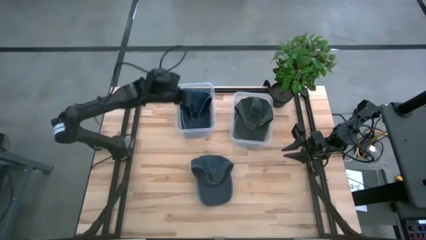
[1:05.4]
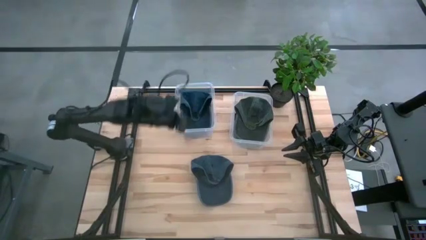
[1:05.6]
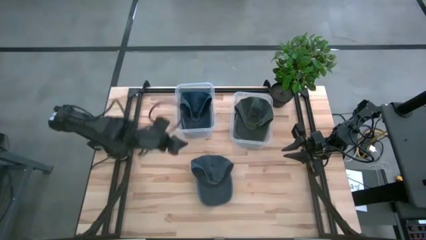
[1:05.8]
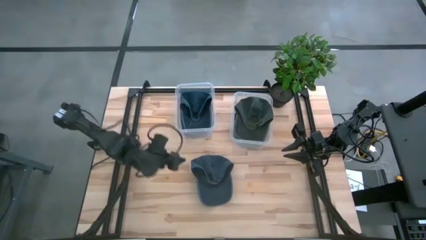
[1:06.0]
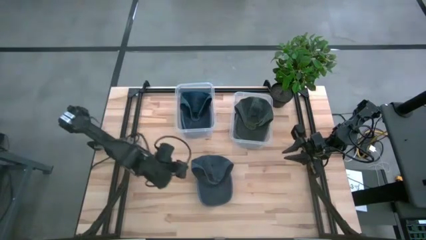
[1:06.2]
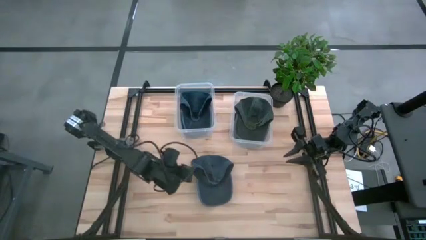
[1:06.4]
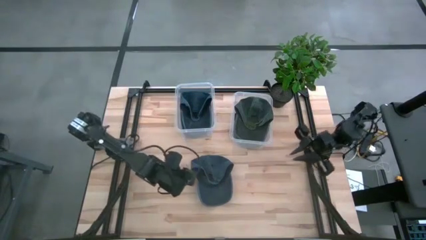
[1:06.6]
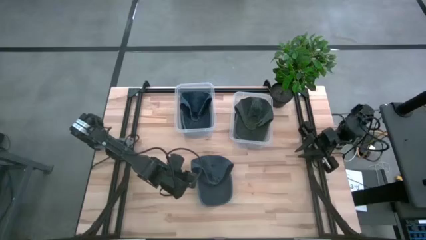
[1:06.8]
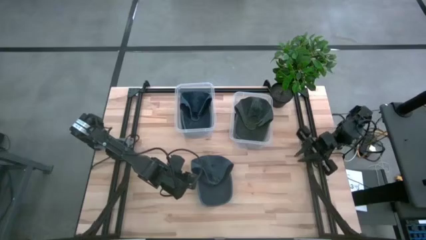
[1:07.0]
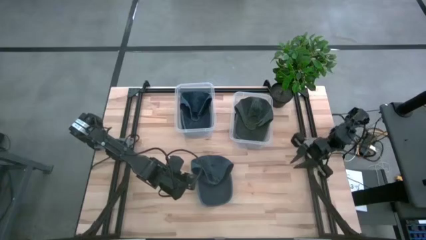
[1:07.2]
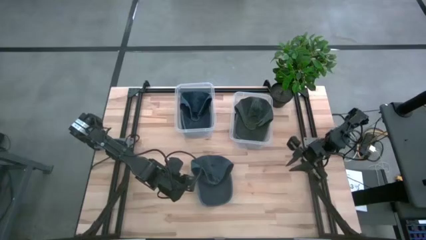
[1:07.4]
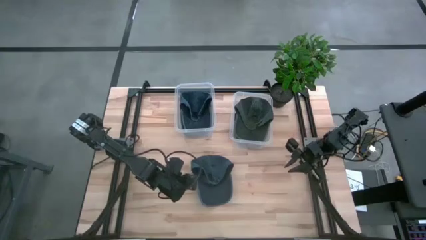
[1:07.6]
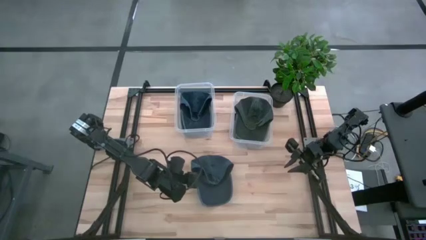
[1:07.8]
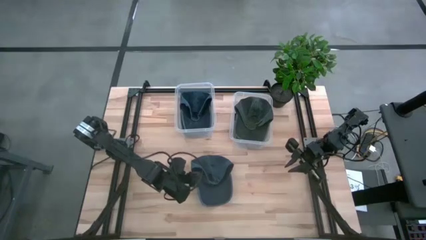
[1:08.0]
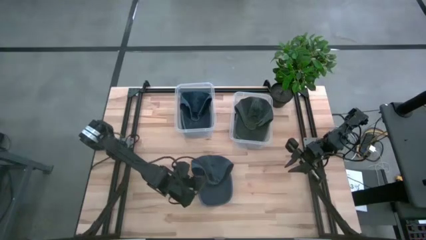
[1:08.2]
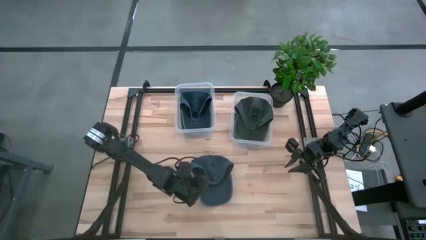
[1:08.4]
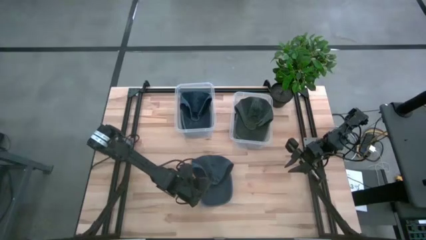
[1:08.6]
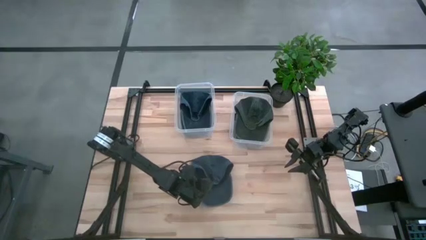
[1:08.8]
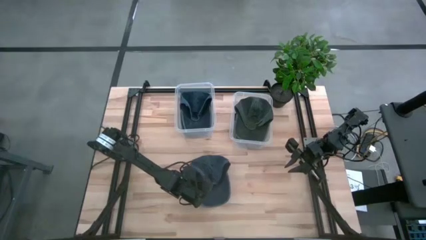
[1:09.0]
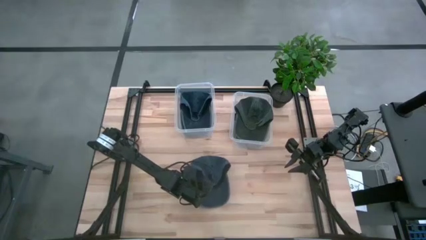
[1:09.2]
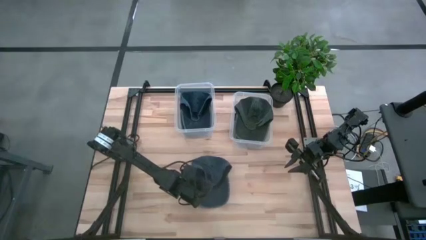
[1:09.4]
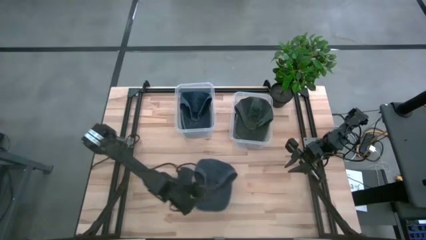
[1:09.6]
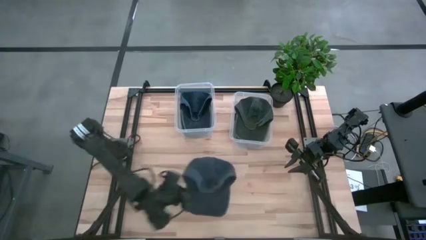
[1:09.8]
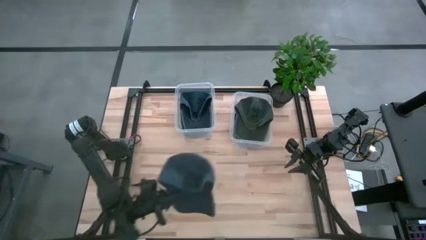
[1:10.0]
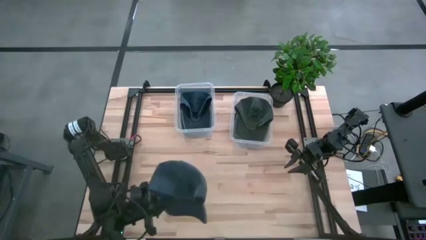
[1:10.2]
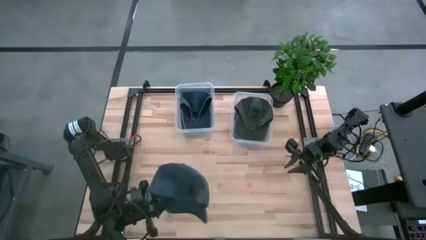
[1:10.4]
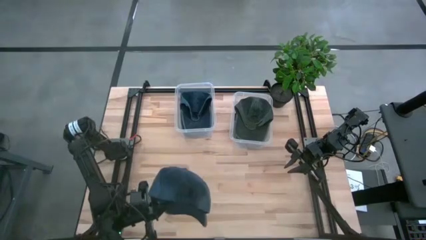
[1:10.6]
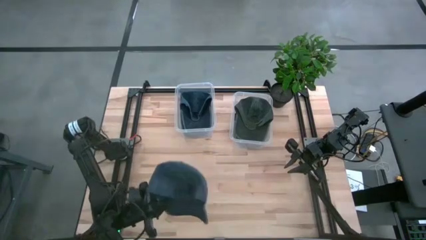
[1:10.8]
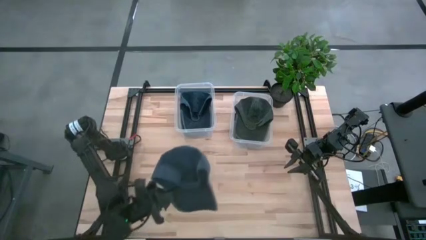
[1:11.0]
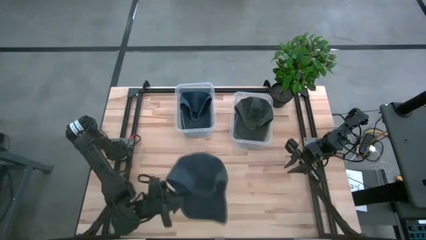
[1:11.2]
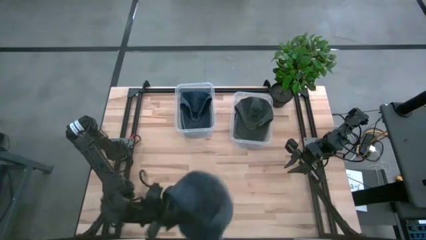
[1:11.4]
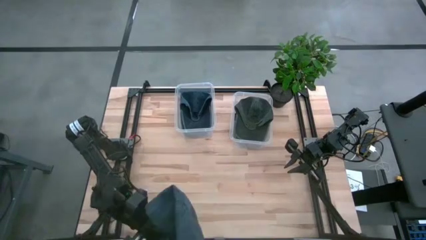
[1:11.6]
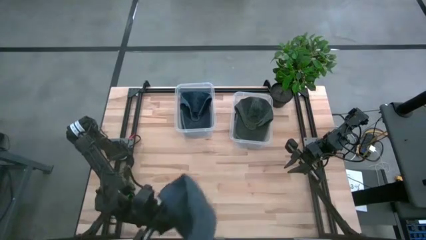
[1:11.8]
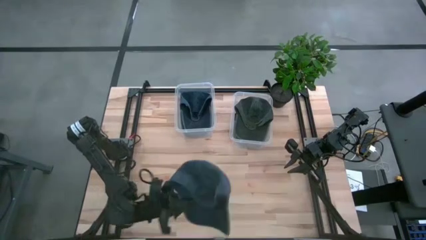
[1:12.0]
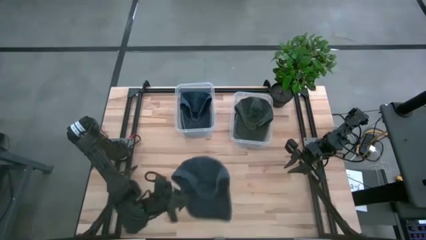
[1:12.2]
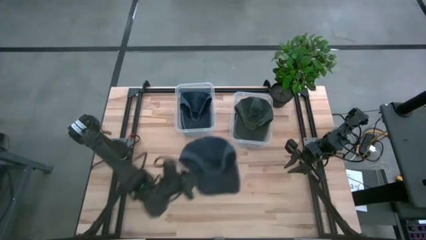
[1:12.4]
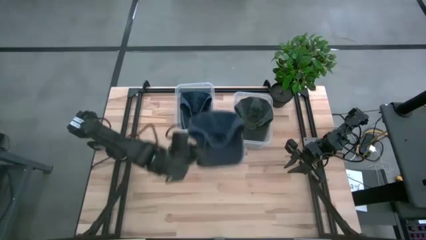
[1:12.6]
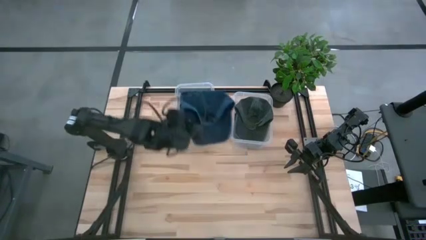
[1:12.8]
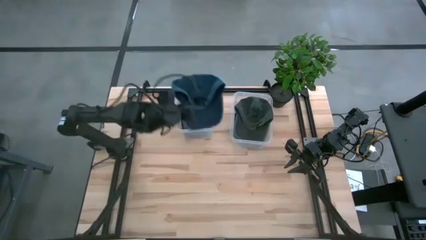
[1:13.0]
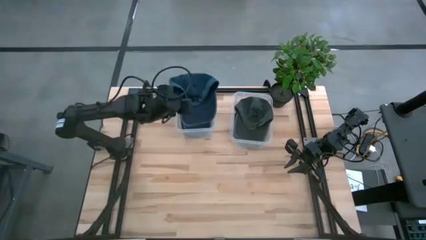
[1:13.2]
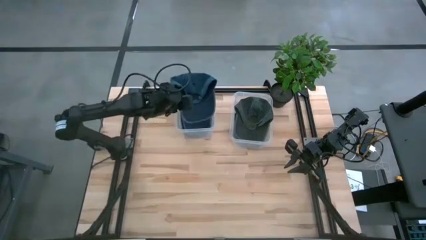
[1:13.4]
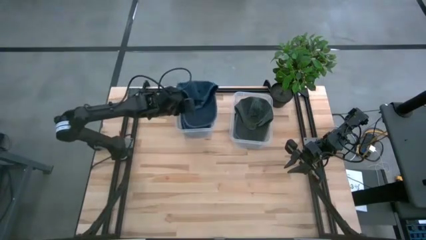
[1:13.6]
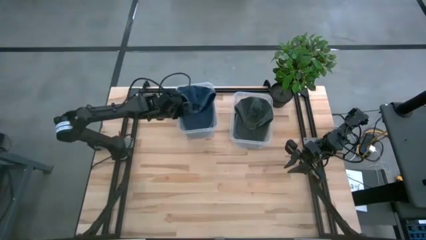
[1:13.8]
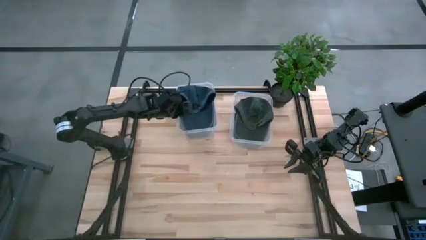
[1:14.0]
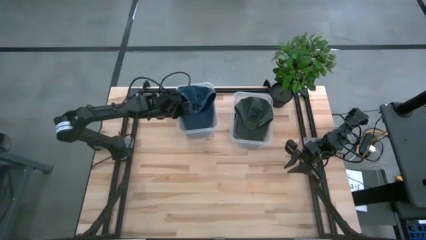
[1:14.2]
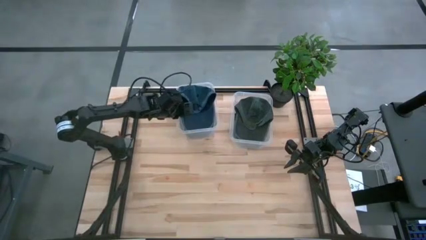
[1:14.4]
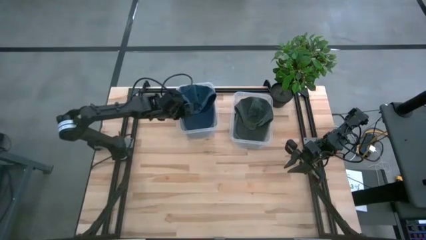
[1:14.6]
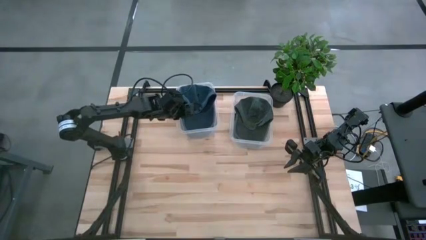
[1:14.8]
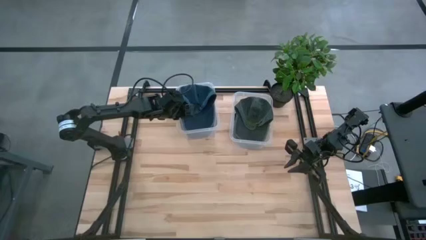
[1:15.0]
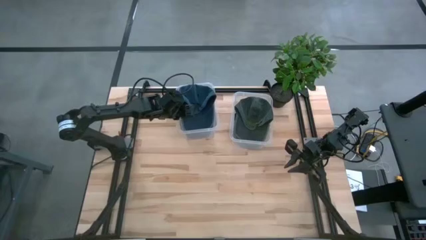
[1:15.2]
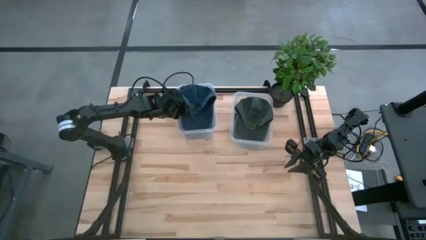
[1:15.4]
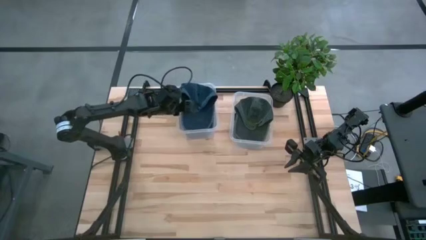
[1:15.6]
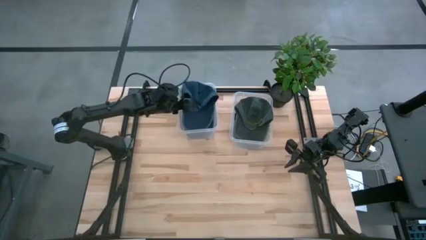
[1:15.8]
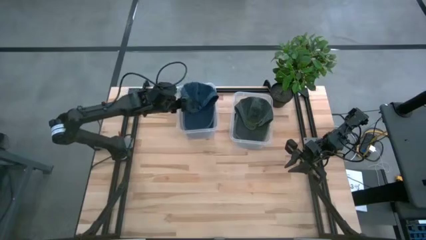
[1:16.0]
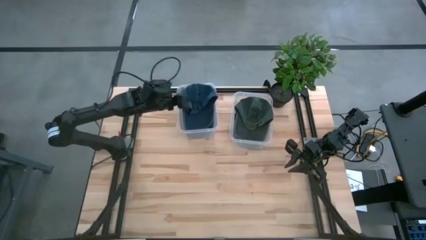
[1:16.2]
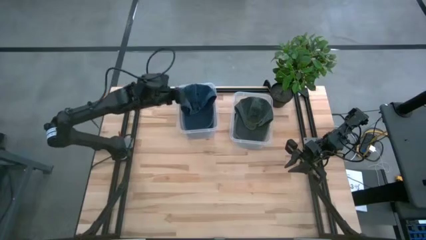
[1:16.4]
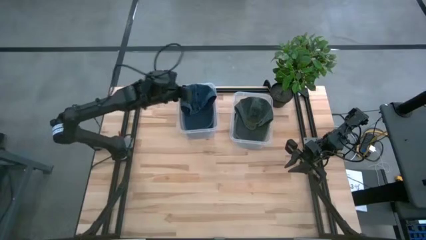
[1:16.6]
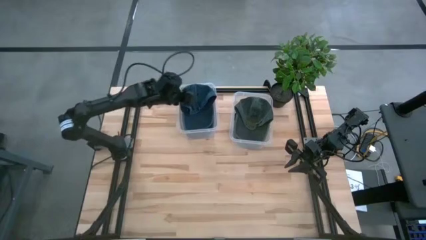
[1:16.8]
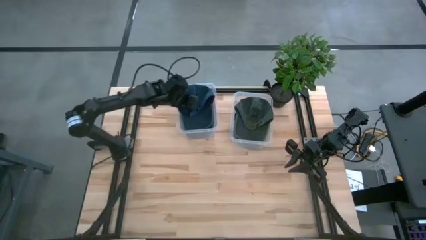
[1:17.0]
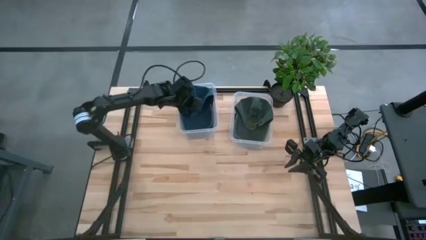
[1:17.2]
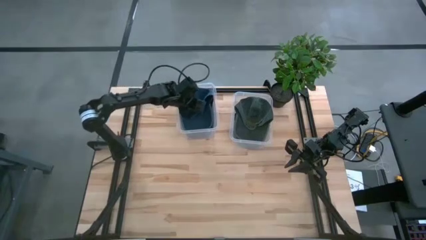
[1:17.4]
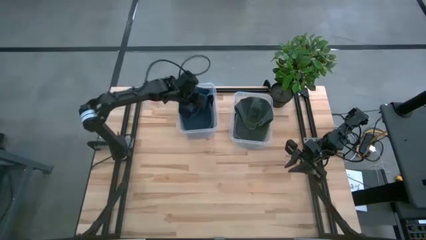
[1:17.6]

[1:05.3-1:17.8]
Task: Pick & Place hat
Put the gray cap into the left transparent bin

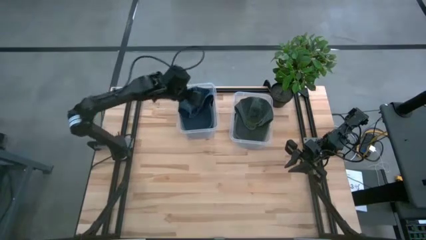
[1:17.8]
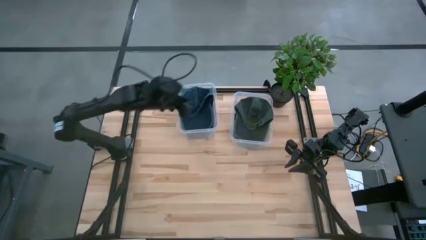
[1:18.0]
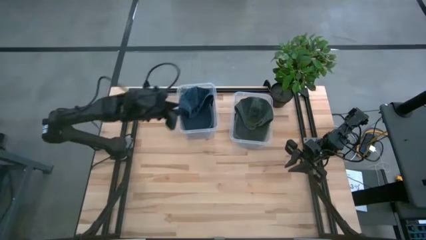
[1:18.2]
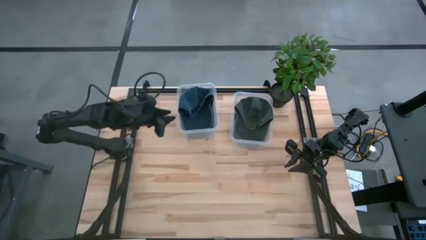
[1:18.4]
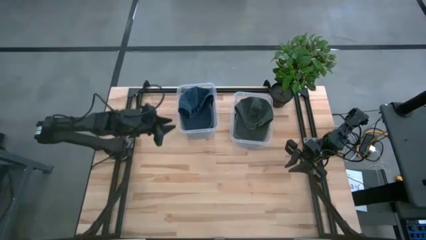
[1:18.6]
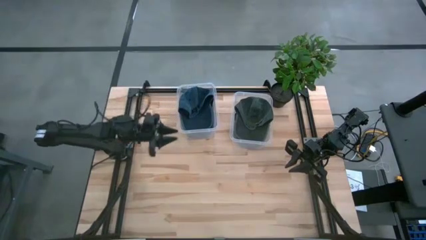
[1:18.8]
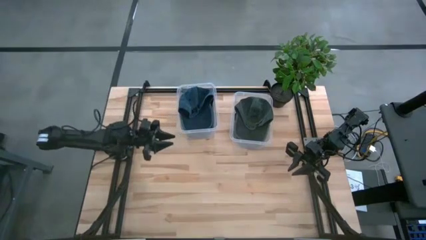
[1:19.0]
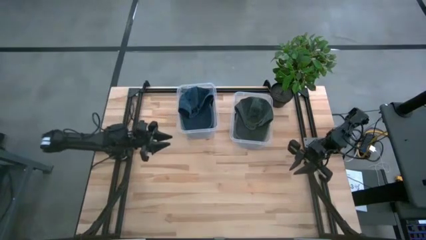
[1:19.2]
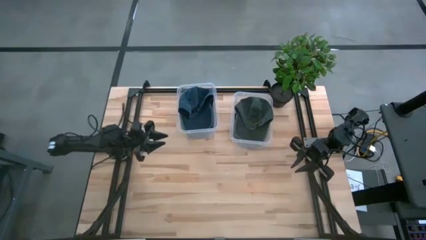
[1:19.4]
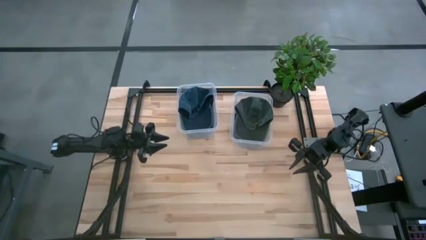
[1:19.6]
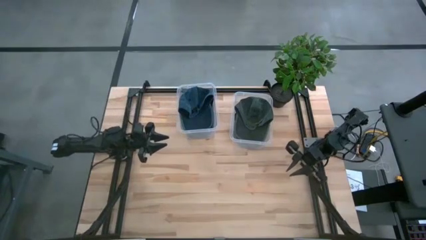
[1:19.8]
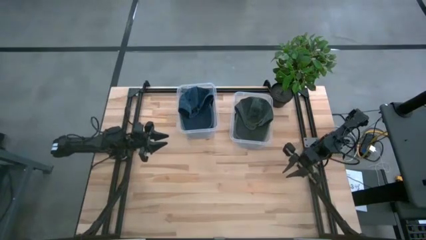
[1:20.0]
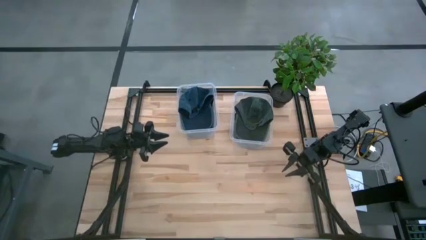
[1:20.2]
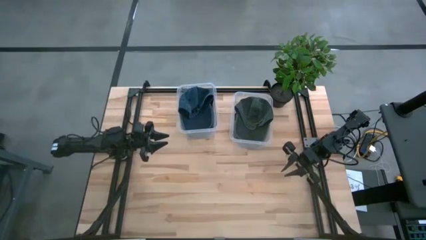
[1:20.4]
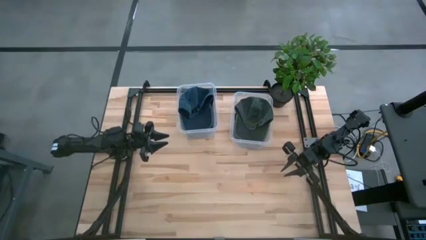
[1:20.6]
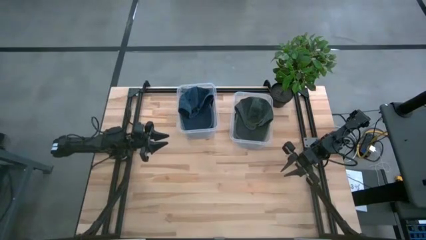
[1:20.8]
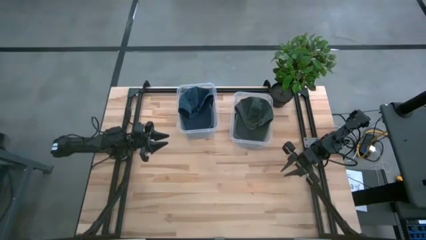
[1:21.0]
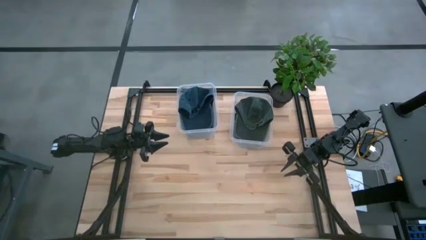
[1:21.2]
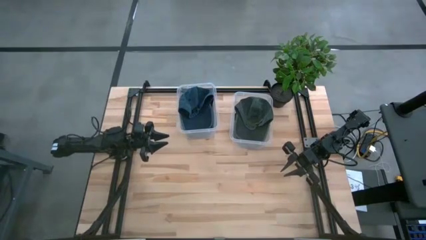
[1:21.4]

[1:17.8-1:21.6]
Return to Home Position
